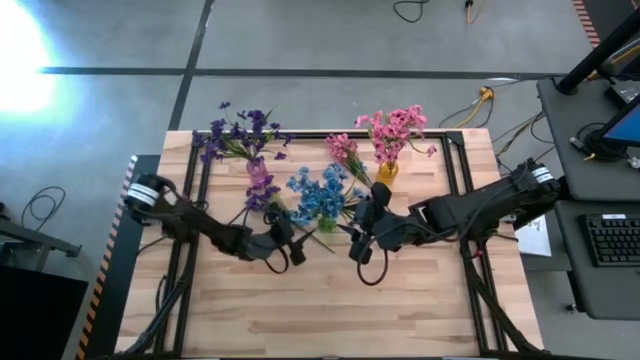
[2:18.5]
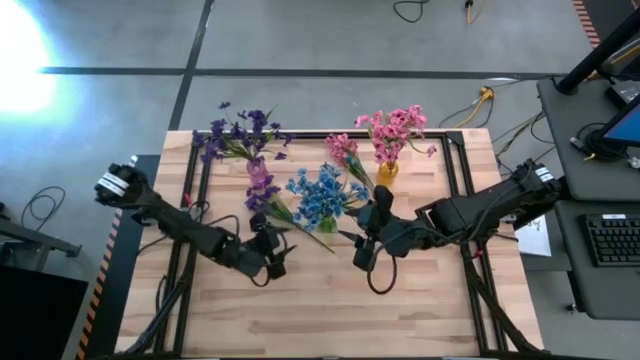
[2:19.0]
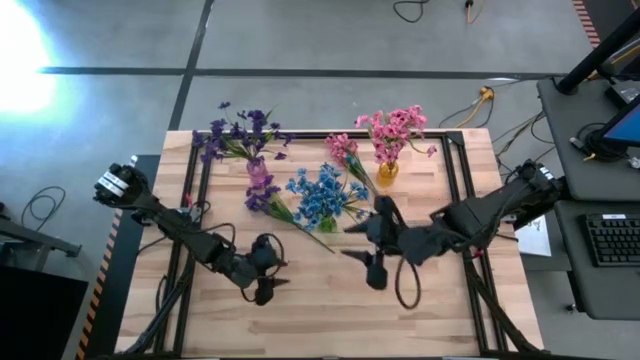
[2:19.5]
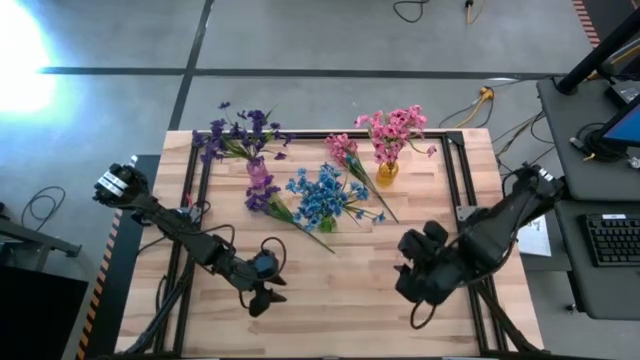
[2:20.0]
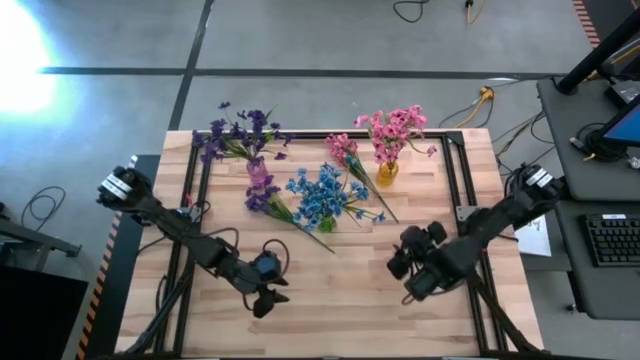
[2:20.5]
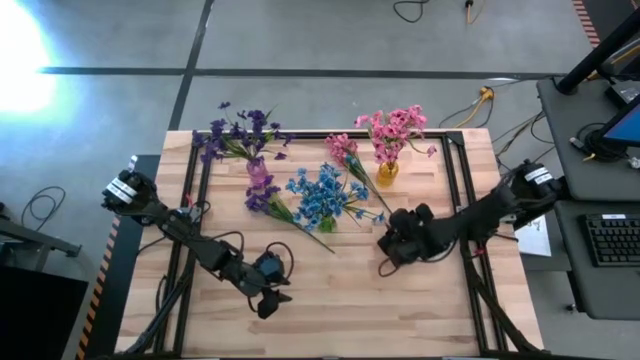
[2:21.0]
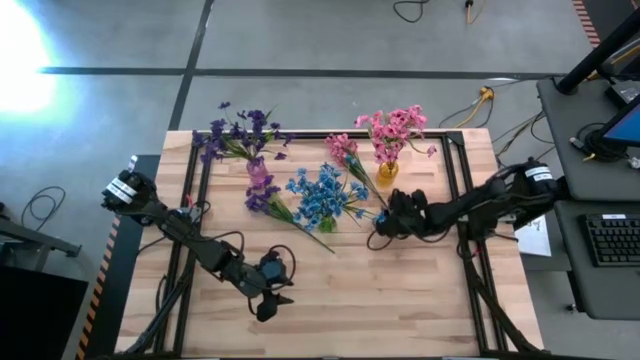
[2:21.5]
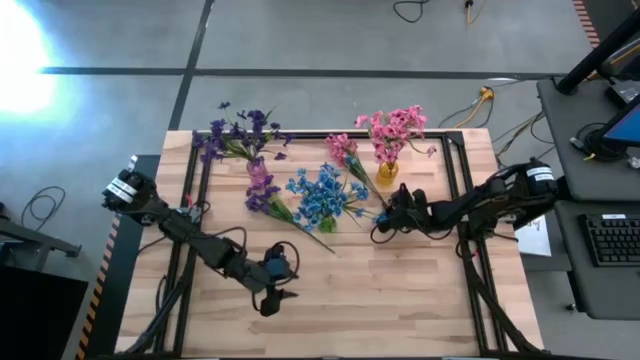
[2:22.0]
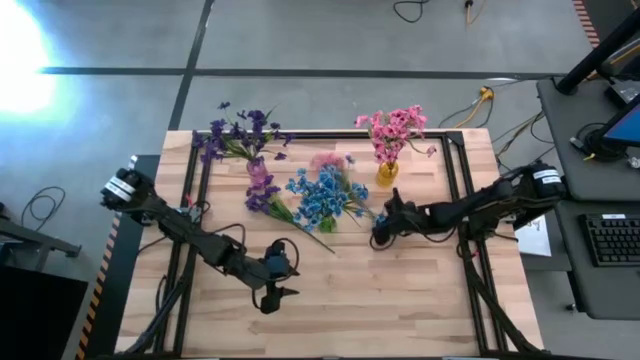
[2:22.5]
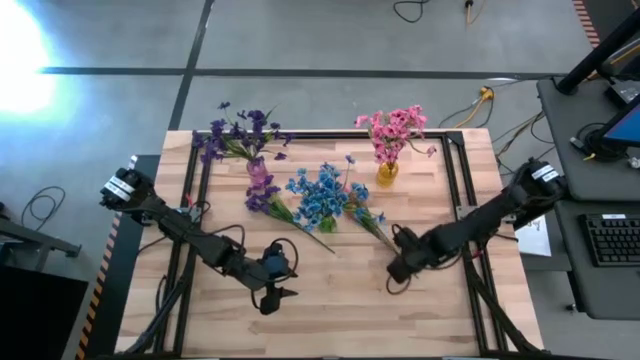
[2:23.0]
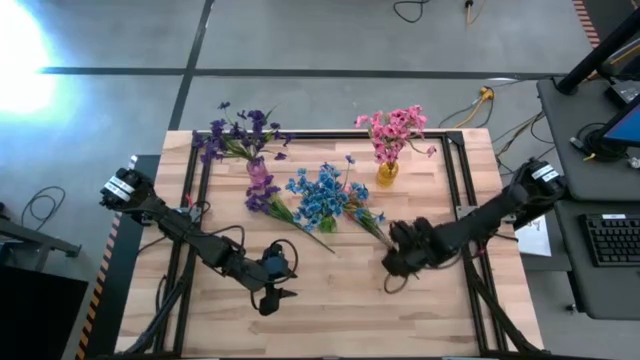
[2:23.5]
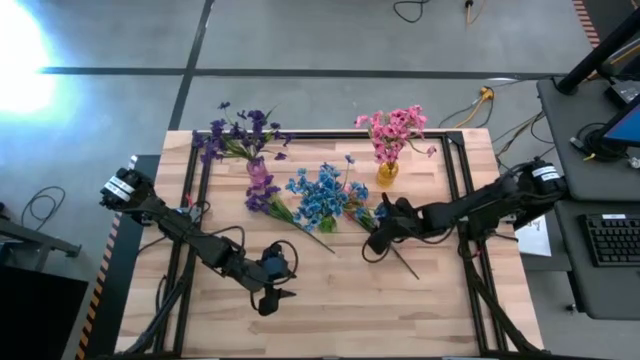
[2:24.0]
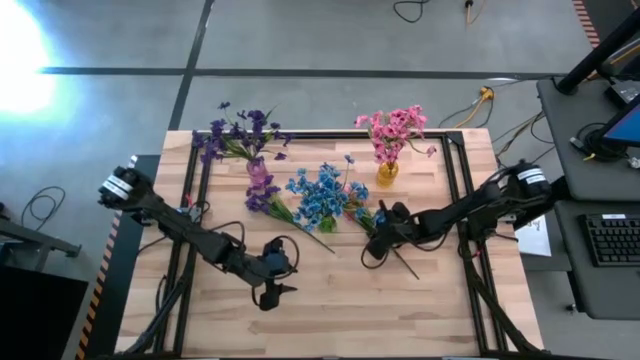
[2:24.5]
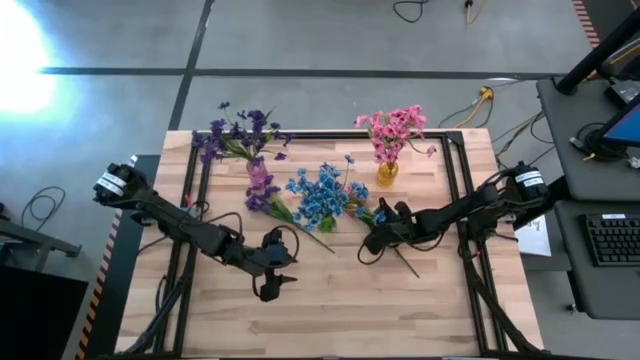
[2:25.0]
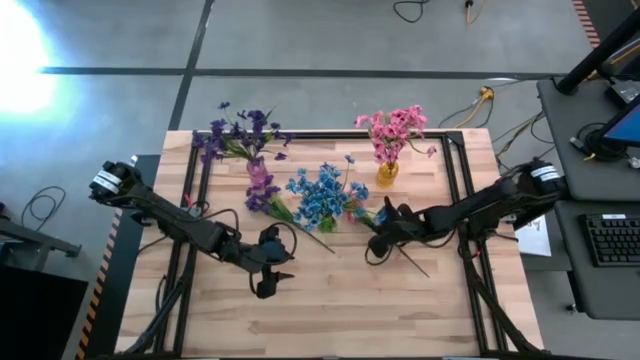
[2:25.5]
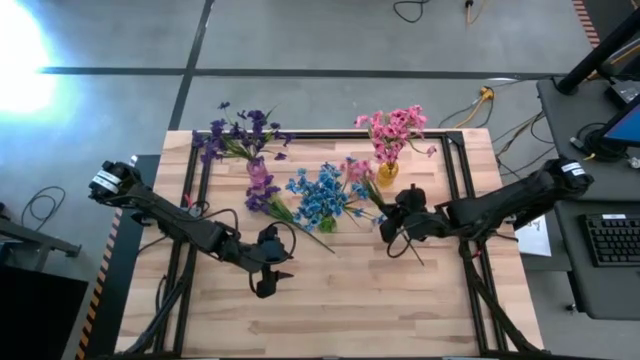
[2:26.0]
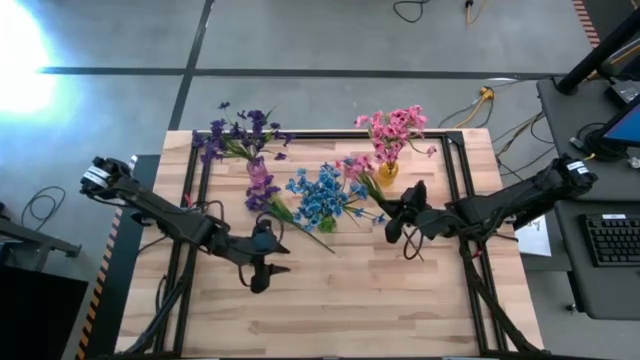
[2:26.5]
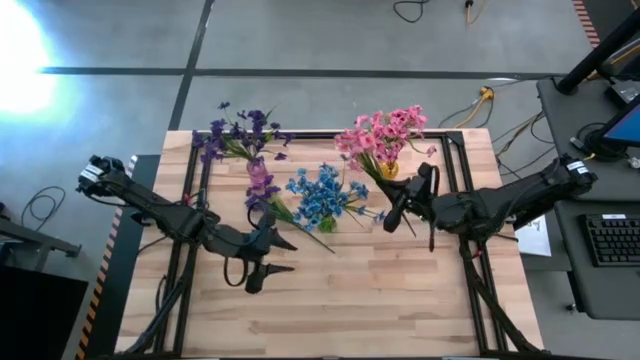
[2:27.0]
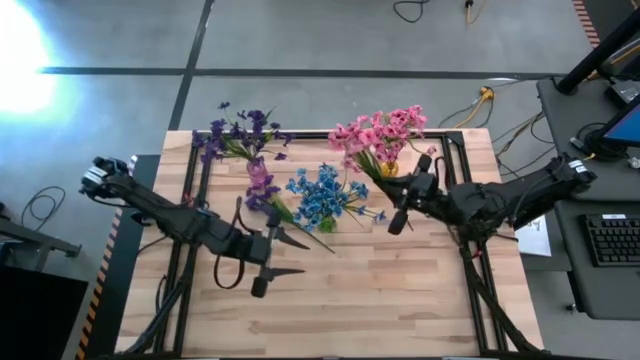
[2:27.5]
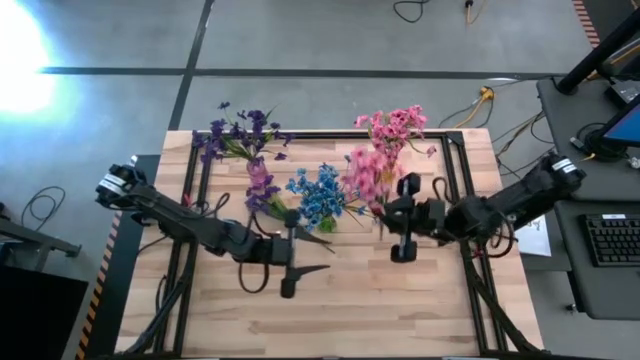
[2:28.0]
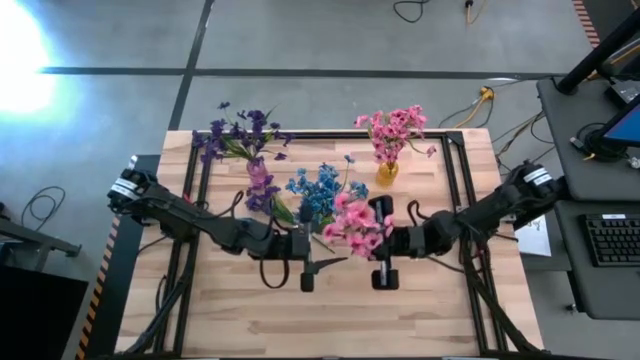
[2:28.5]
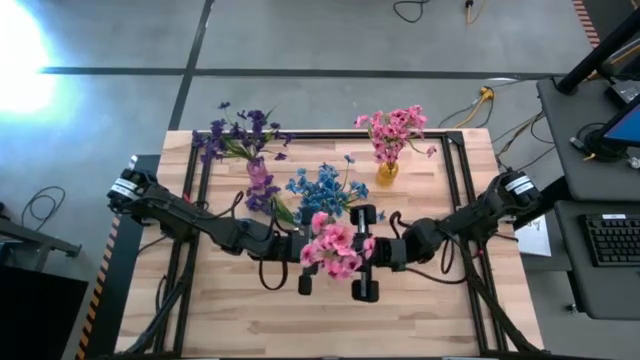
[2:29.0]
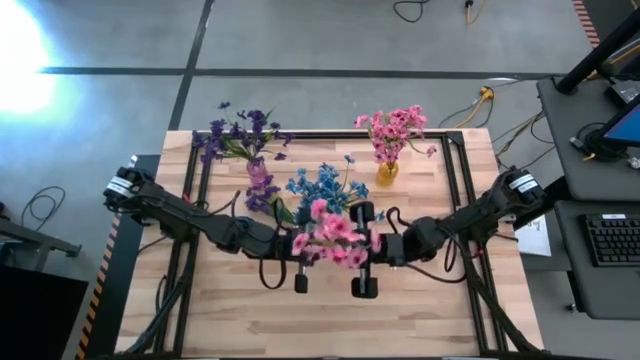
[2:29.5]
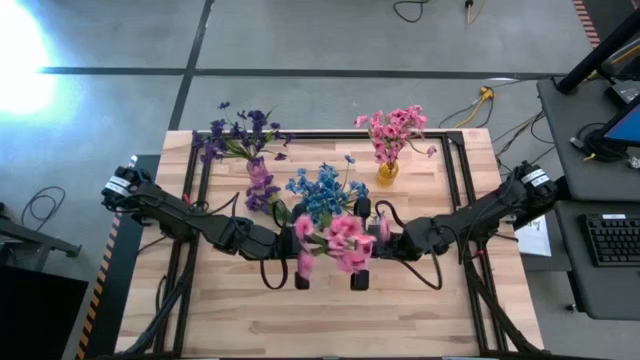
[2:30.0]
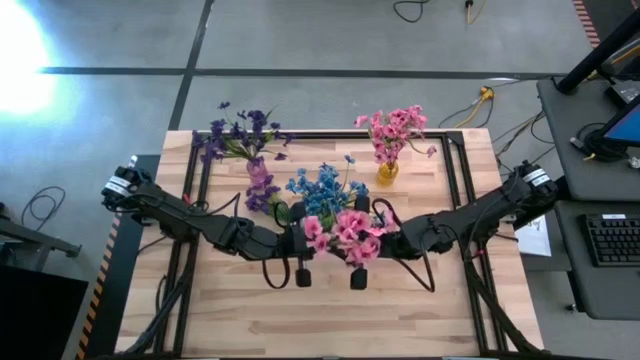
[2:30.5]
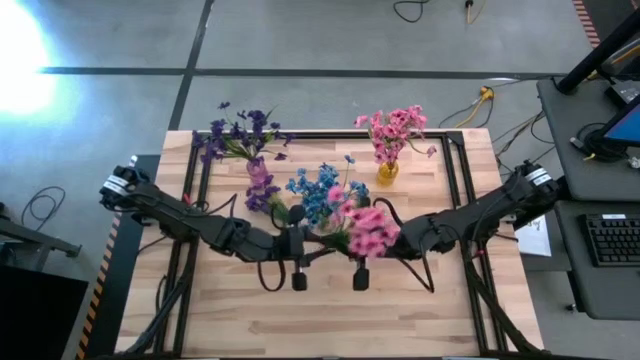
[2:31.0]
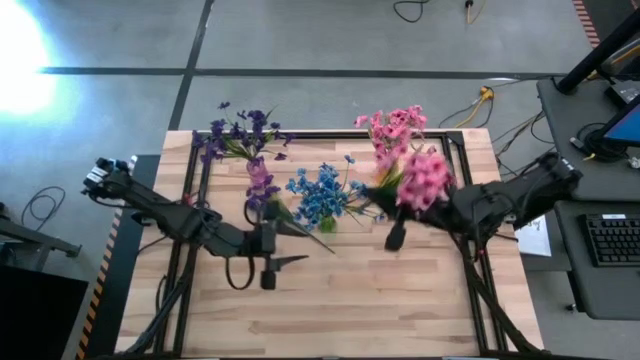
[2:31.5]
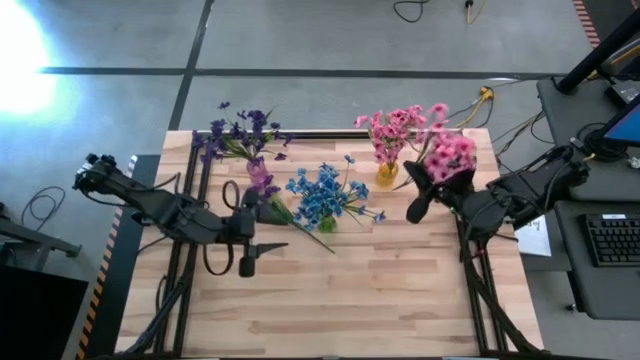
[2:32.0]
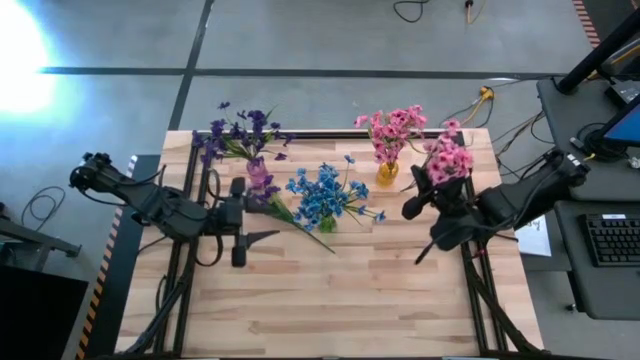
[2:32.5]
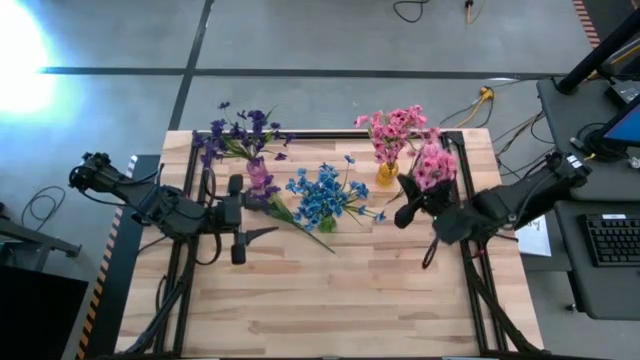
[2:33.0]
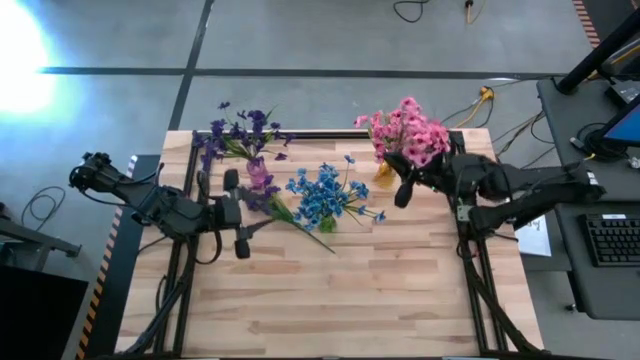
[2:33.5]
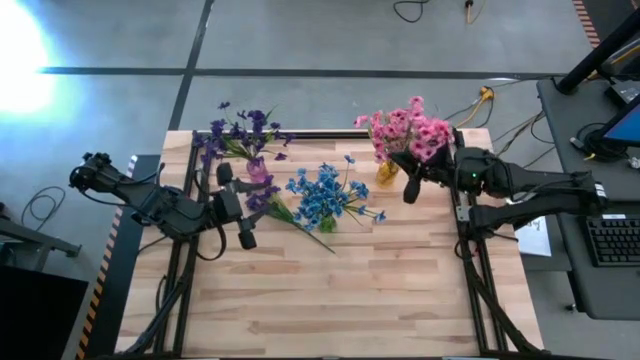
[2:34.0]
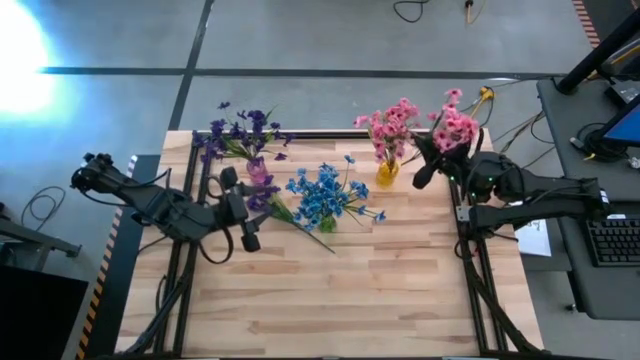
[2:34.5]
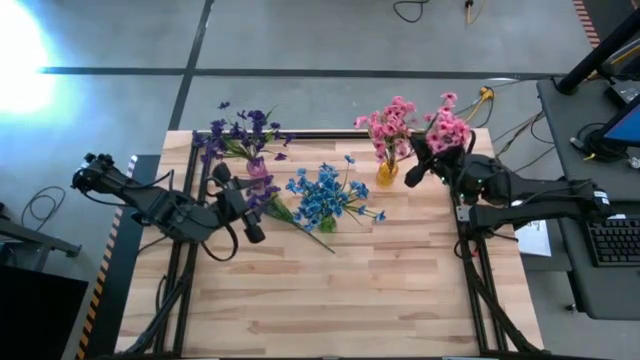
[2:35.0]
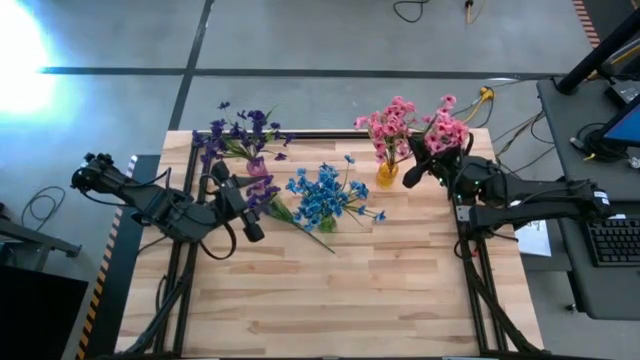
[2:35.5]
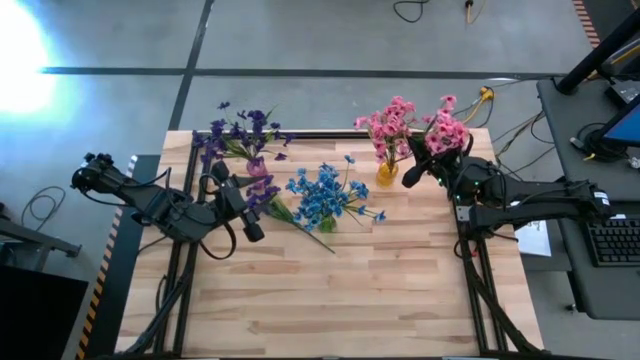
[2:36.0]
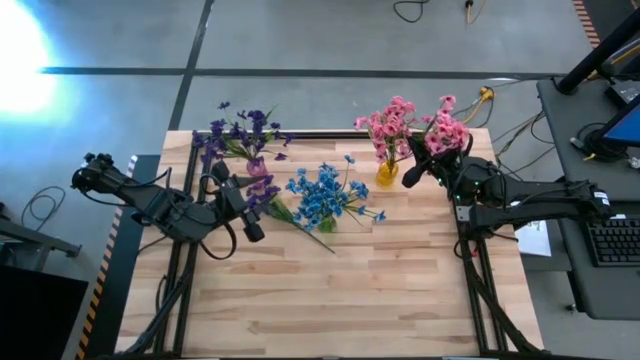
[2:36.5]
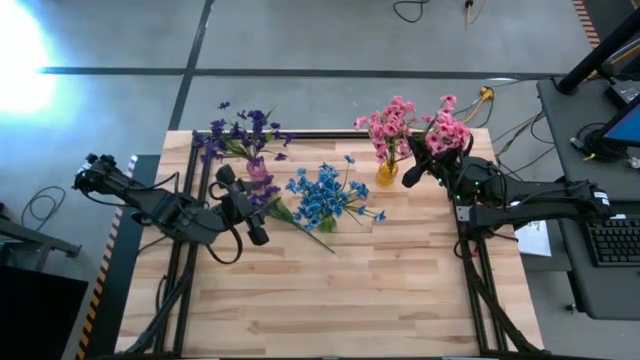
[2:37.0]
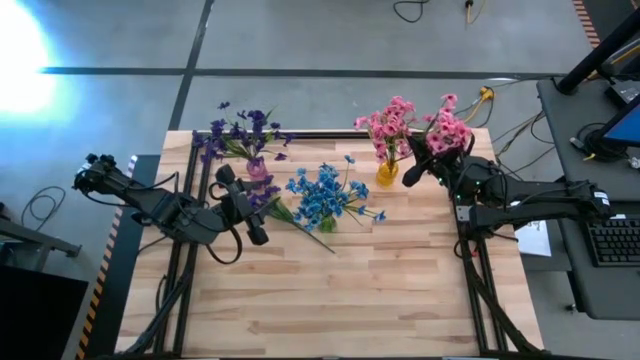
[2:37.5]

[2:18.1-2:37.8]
Task: Sort flowers into vase by color
Put the pink flowers into the yellow vase
